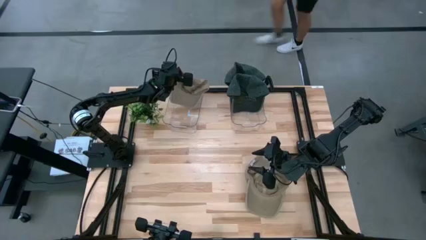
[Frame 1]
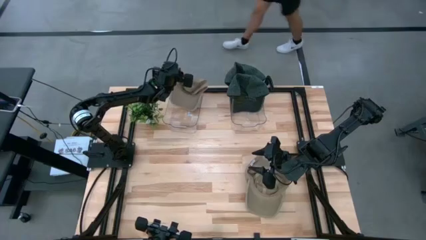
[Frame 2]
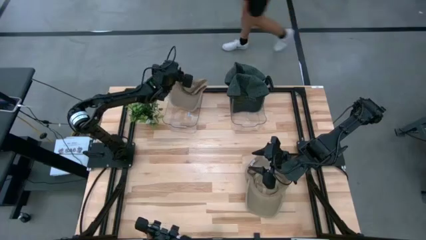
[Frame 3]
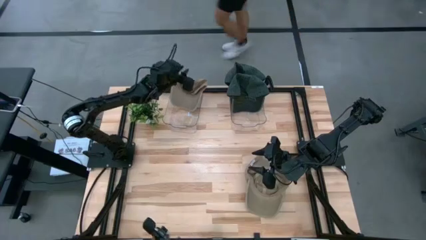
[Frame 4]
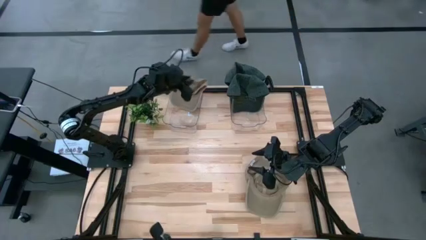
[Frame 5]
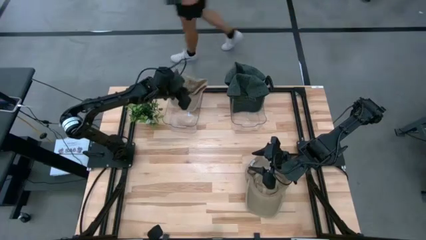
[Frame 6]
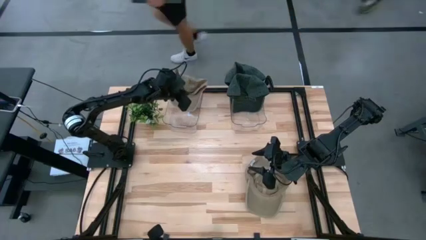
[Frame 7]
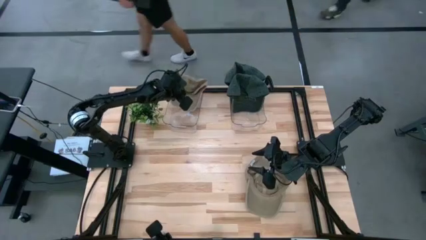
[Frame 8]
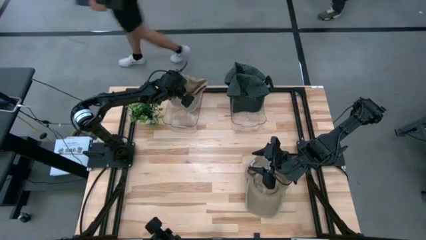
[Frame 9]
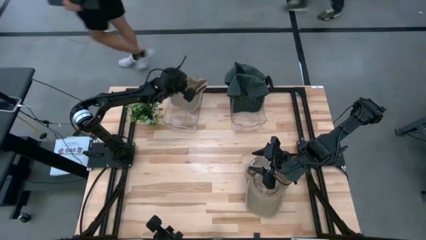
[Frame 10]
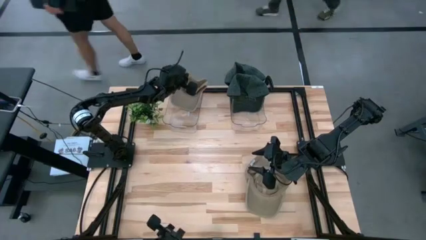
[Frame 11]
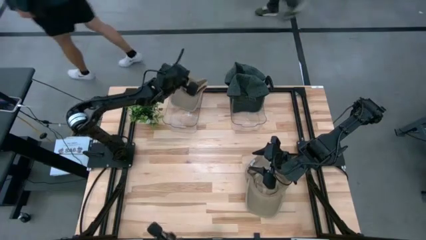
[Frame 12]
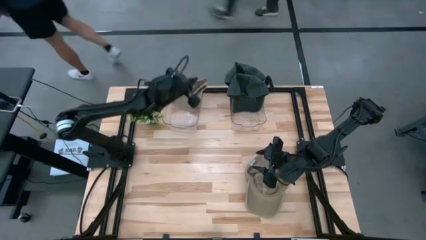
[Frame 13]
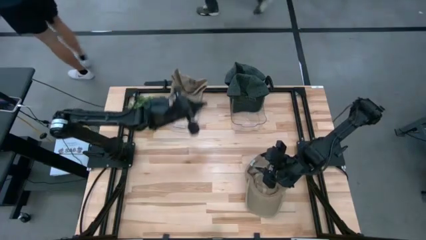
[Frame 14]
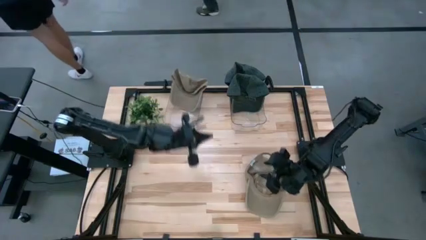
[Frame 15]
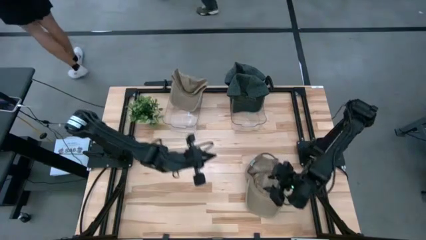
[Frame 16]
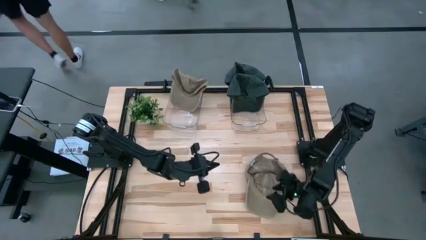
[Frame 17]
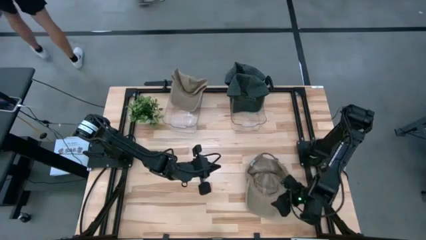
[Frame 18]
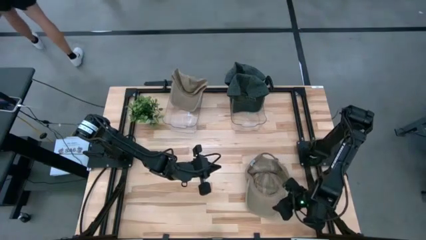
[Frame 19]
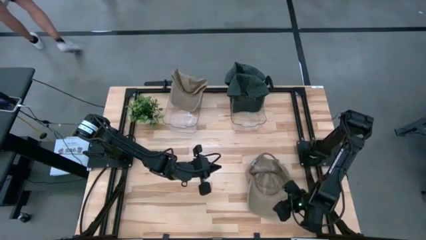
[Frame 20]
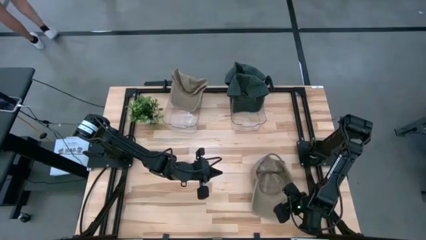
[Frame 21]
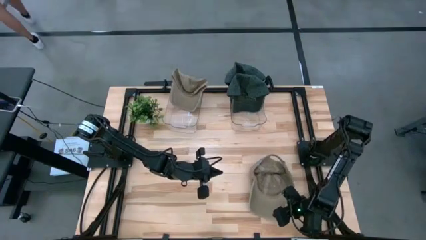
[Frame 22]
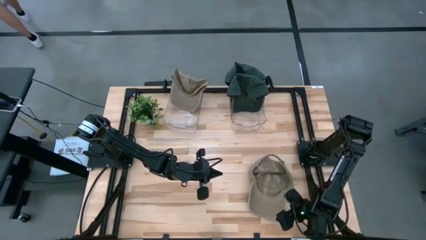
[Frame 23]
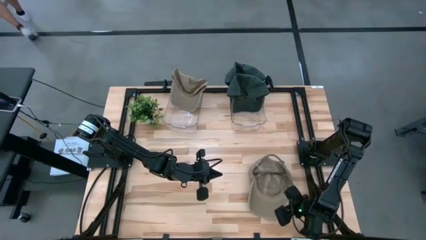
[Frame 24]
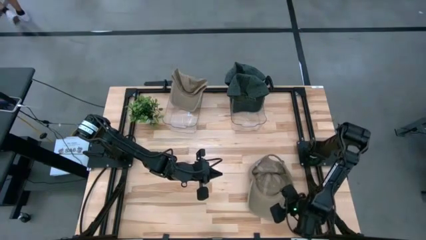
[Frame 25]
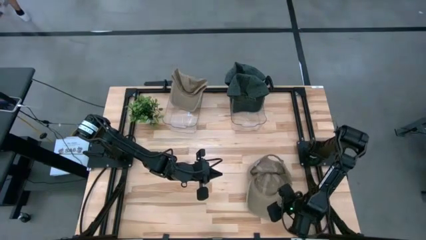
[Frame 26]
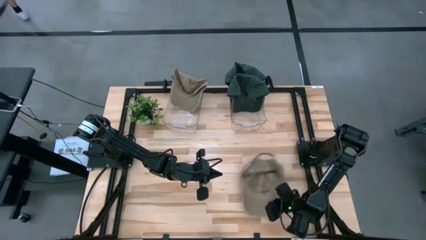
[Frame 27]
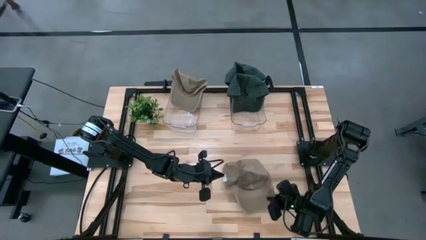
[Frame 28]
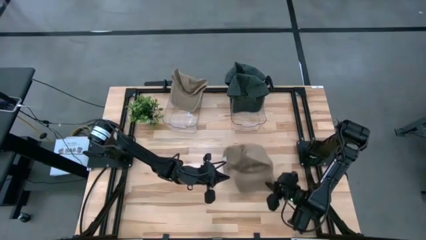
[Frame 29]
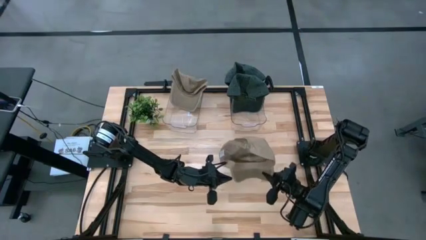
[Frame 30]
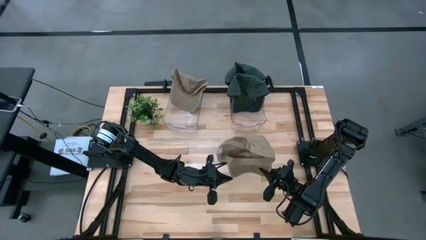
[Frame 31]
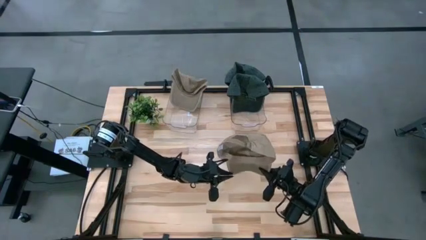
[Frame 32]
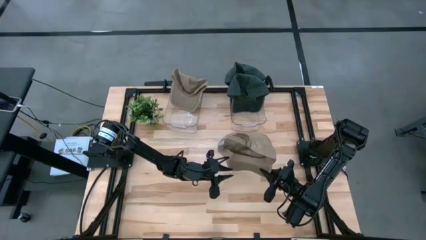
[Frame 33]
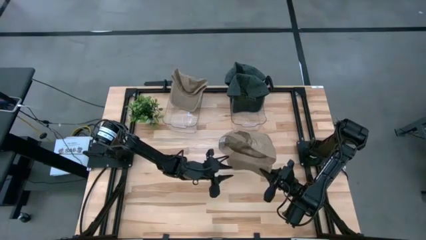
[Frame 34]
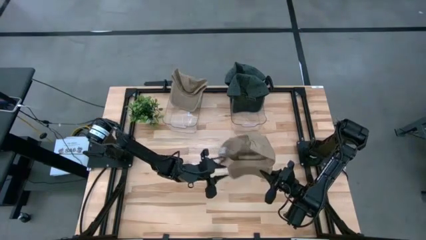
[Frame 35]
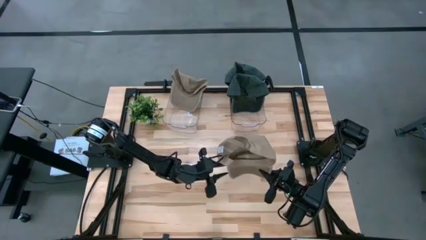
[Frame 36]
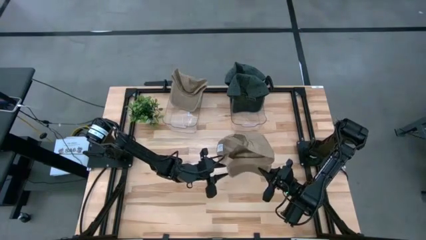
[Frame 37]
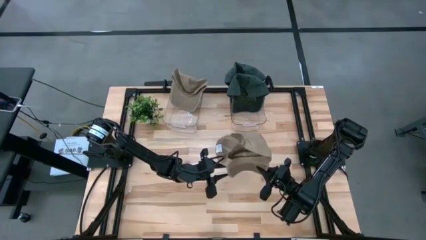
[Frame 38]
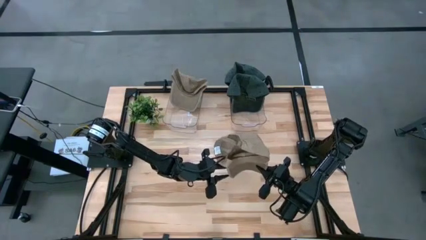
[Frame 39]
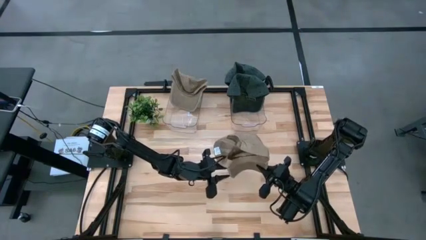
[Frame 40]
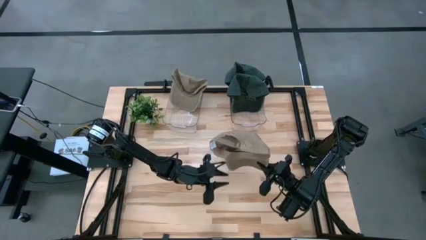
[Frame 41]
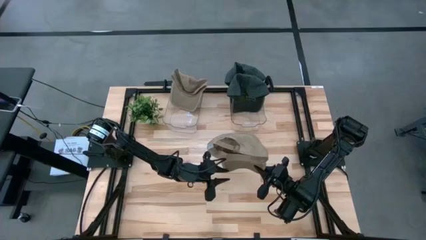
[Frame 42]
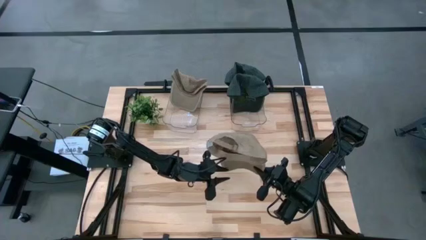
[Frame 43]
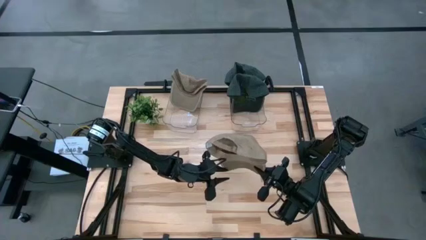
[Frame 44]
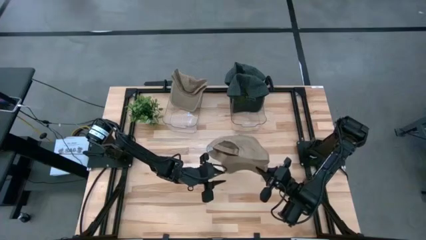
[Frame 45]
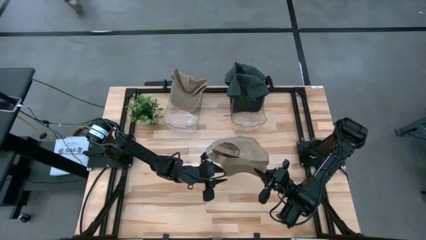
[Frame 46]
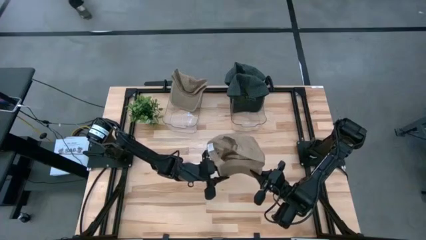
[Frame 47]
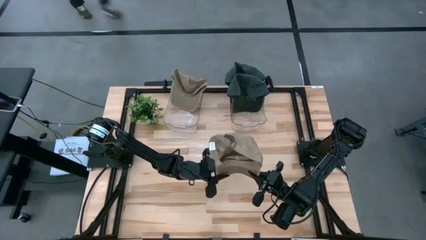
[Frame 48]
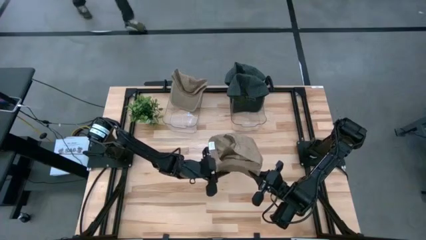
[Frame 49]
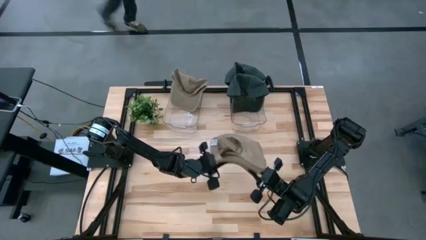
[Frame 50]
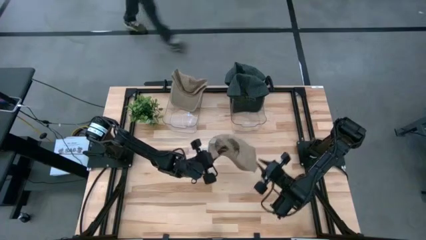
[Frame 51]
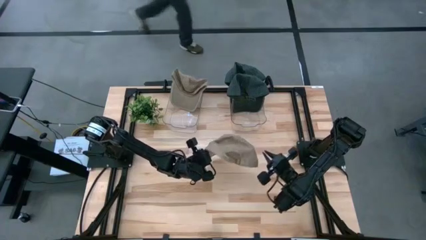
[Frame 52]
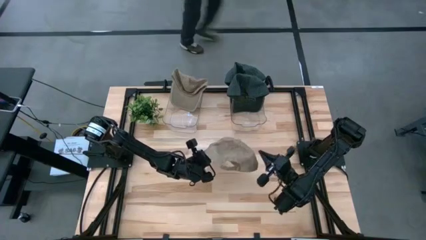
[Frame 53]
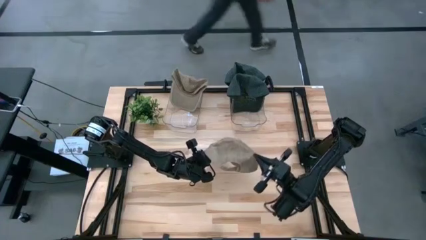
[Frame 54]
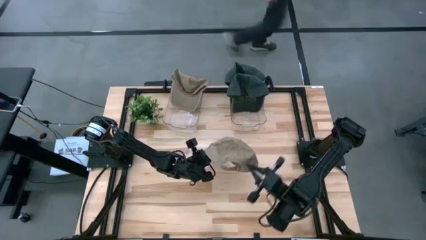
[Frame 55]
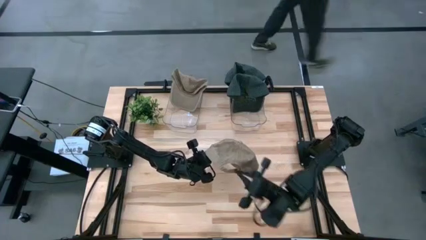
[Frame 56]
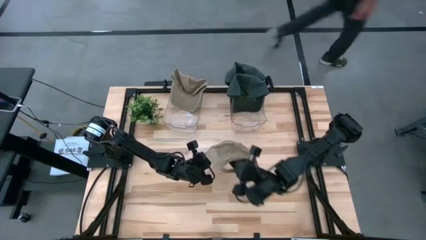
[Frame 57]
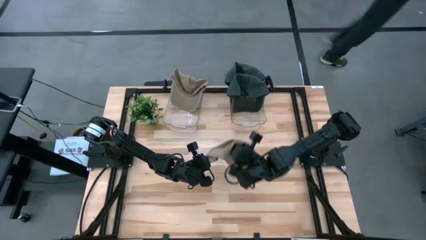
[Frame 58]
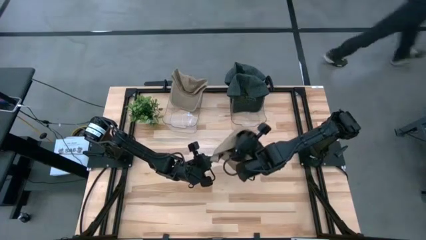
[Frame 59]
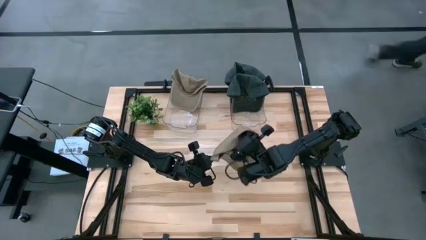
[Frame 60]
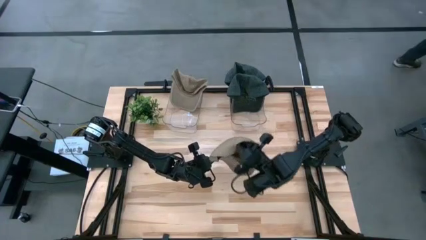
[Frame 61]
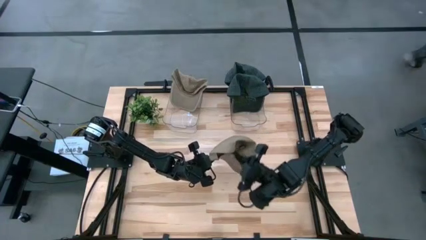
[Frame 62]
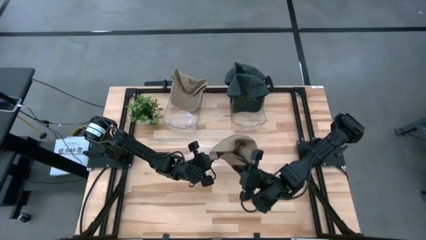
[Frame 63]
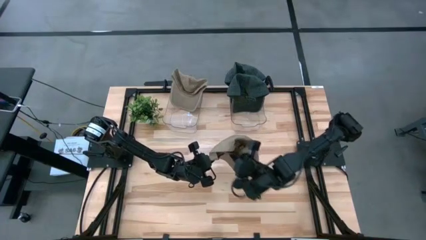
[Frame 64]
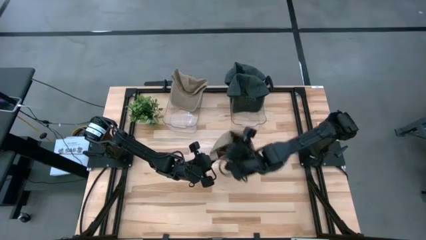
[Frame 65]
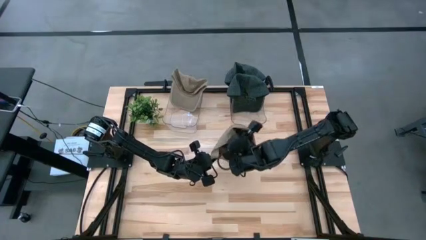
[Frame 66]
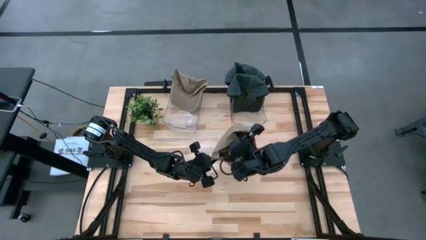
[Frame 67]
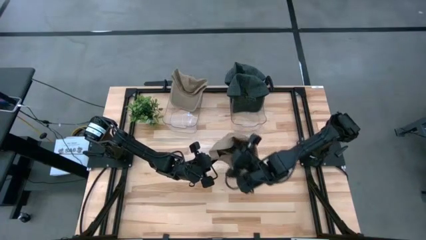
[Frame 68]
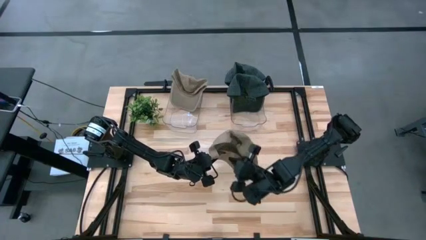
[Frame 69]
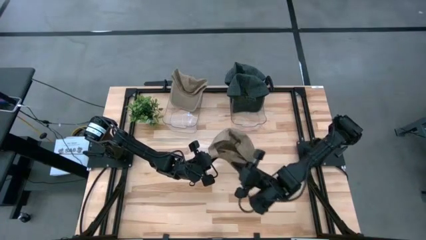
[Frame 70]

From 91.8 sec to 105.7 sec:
Task: Pick & Place hat
Put the brown cap into the left transparent bin
